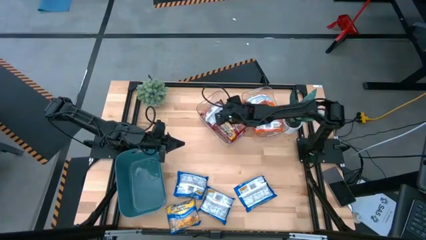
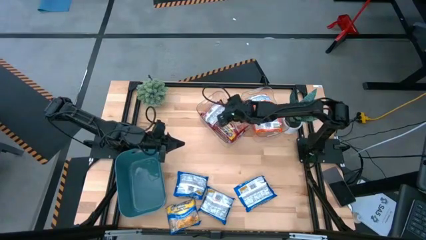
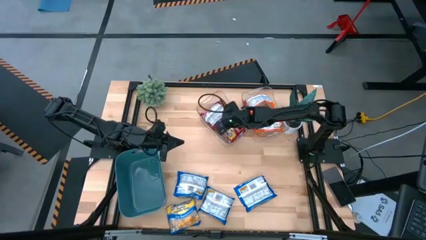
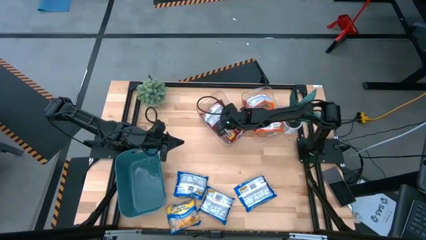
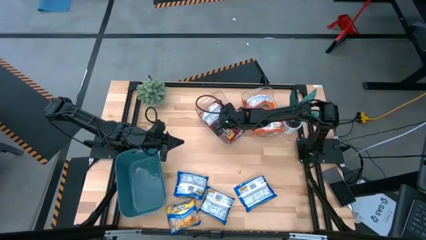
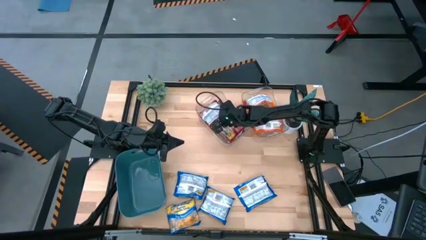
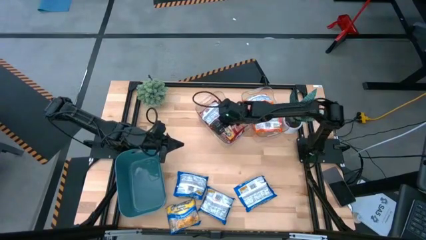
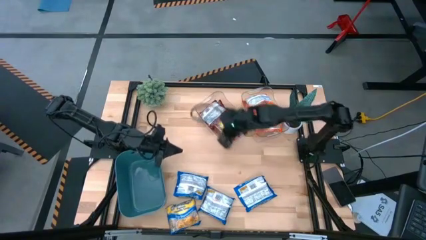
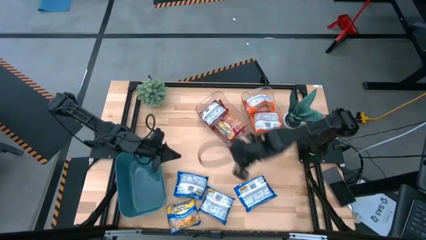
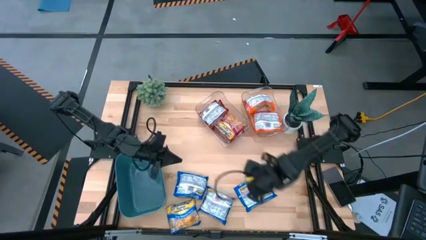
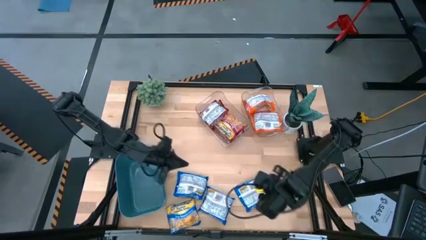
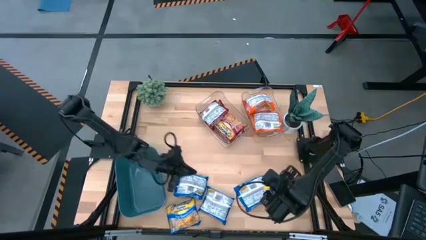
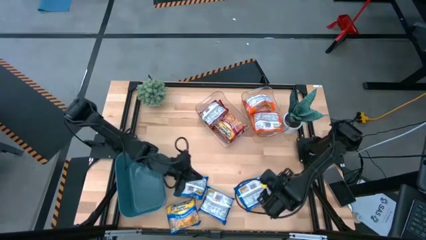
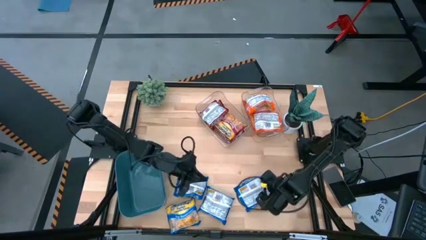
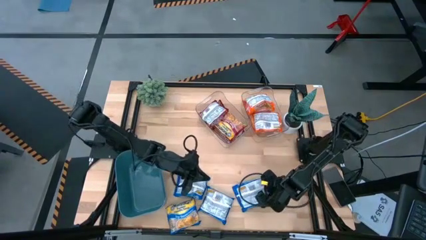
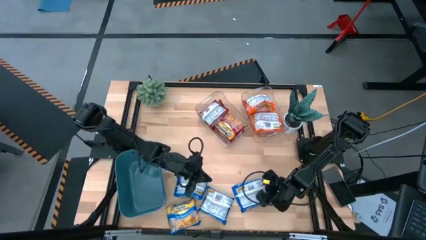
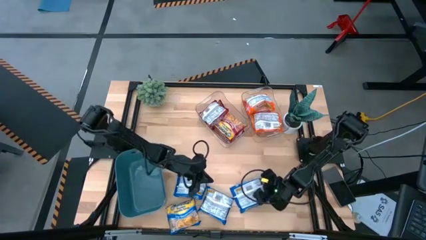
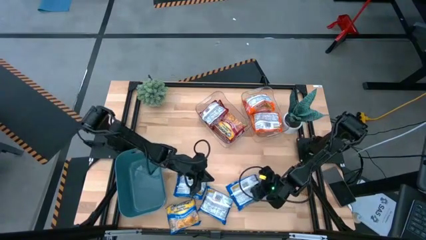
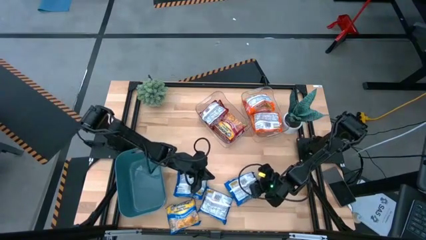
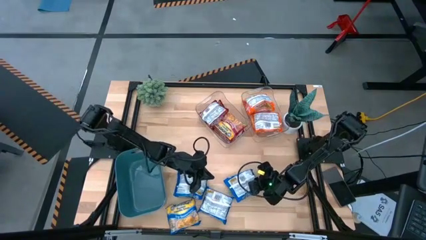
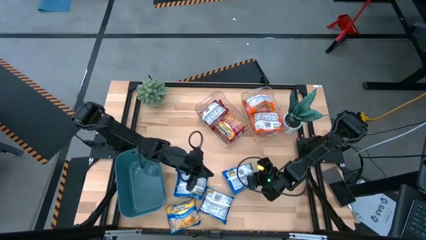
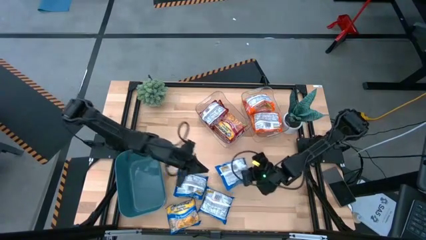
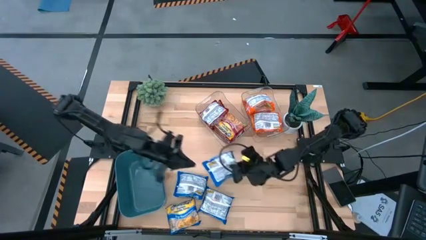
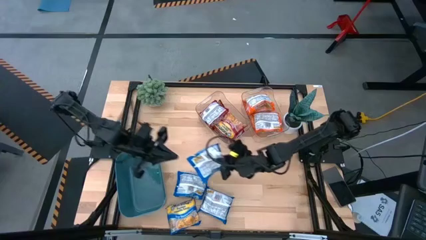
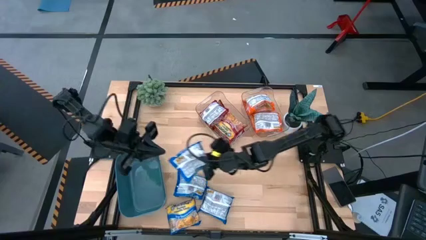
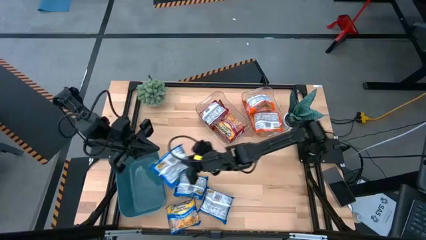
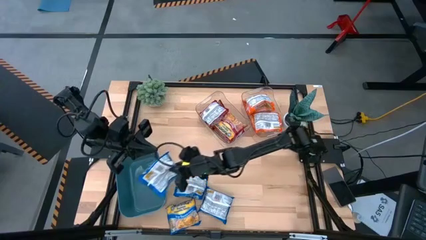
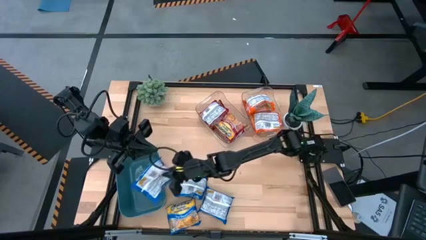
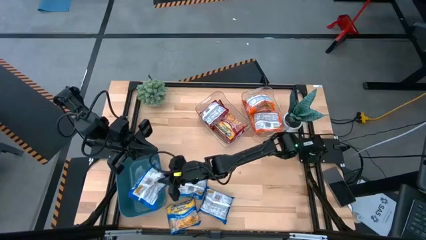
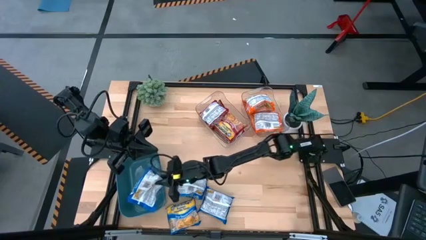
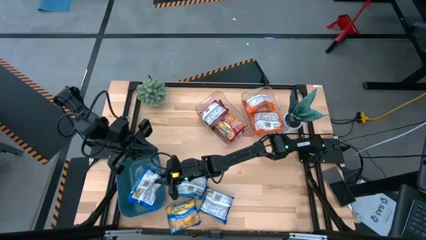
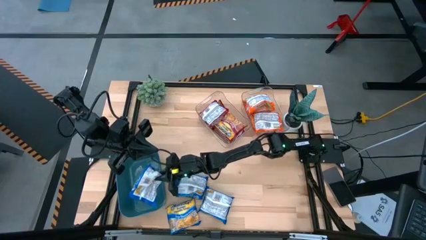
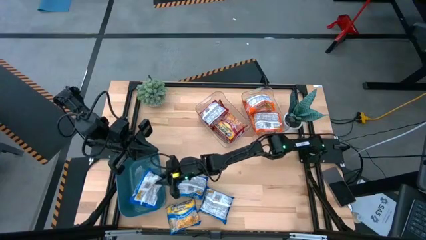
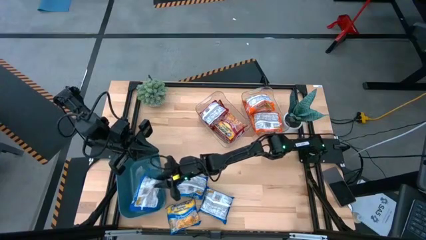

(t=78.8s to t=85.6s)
Task: Sort Maruchan noodles
Put the blue noodle pack into the blue bin

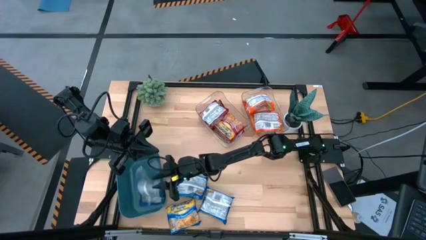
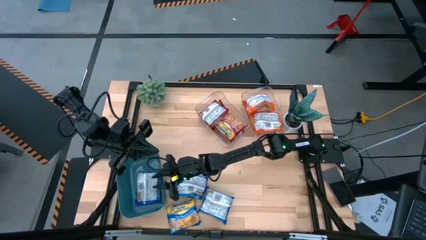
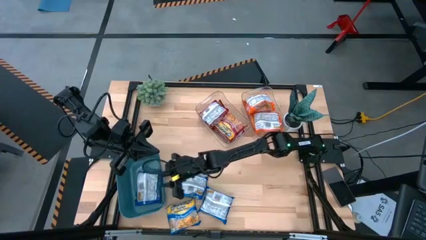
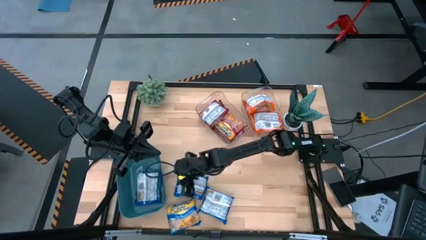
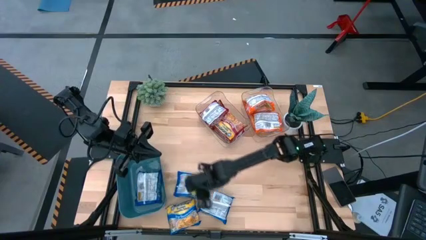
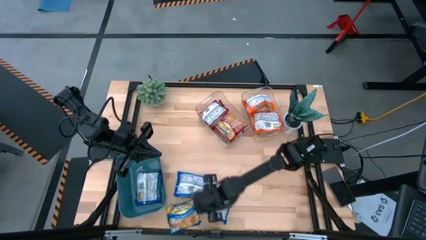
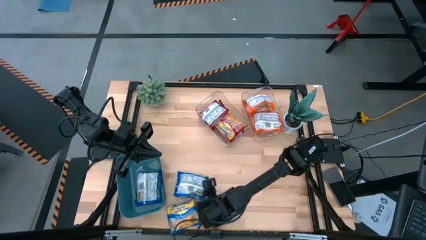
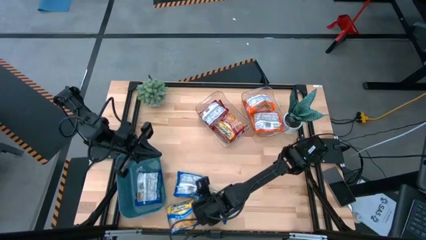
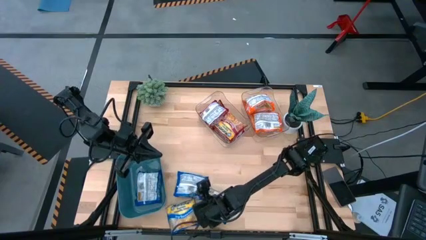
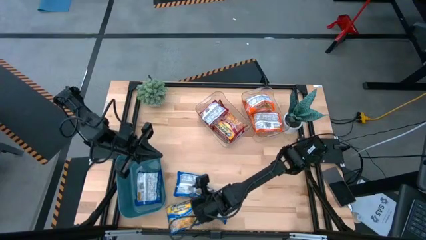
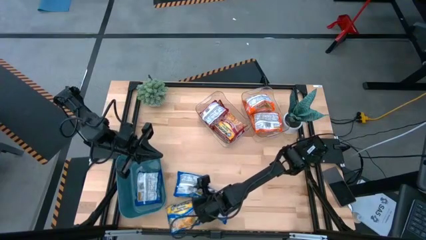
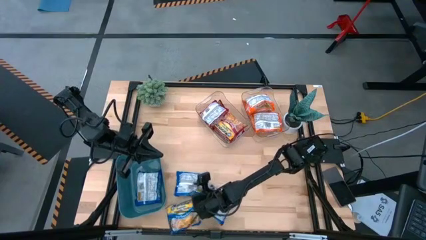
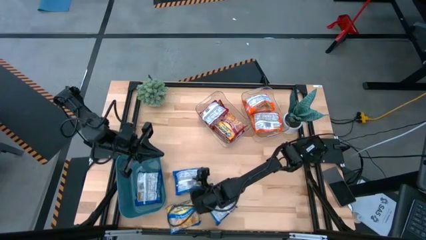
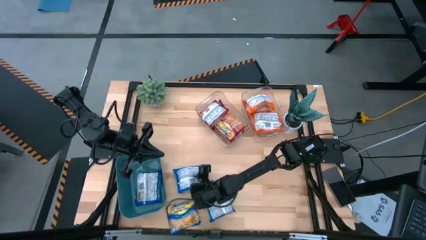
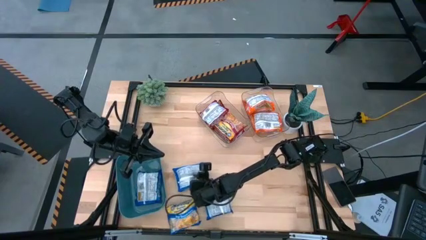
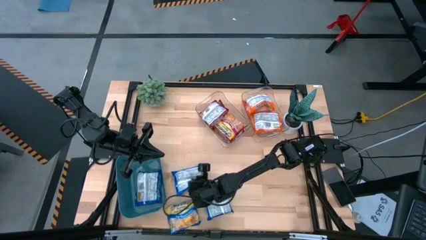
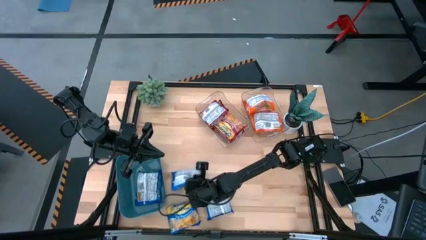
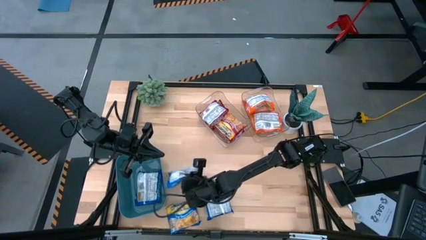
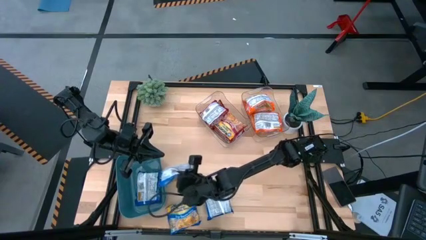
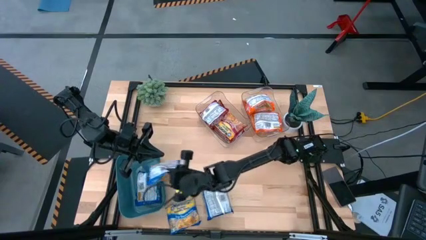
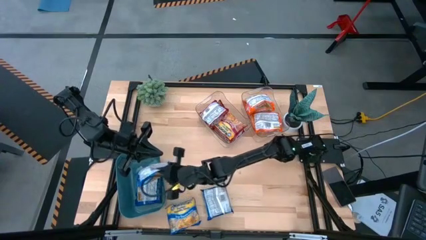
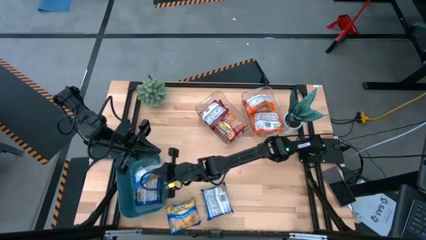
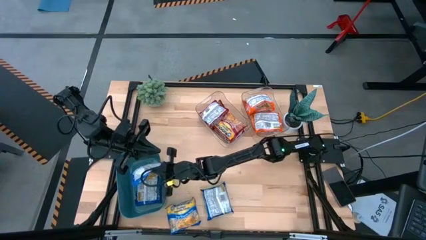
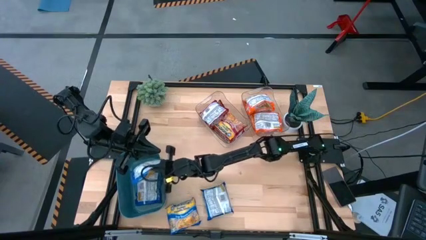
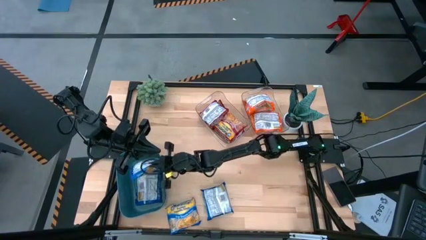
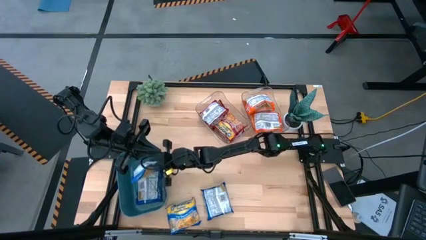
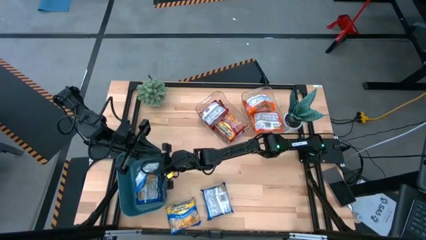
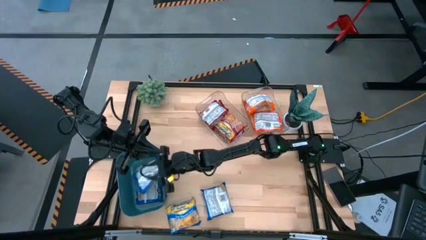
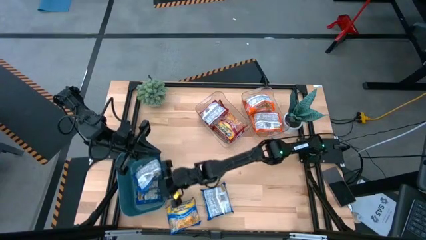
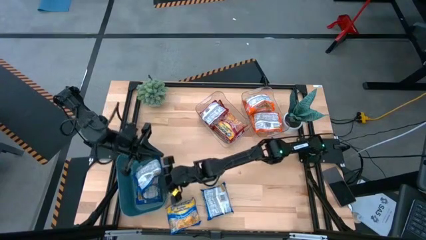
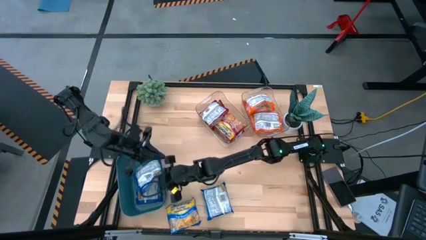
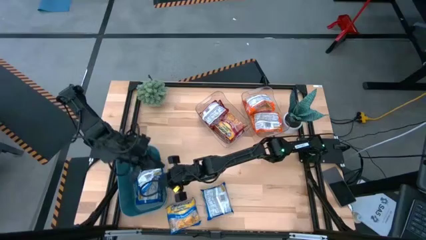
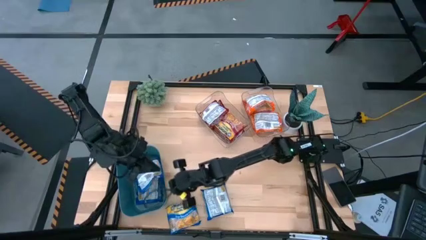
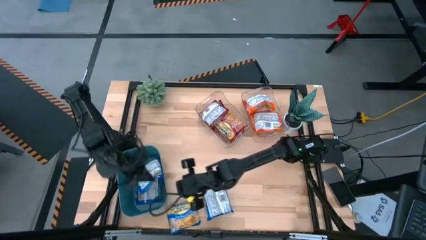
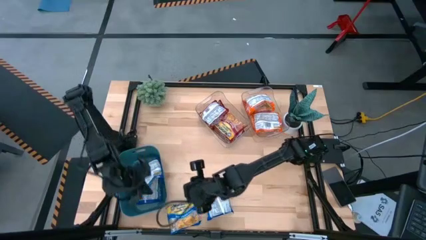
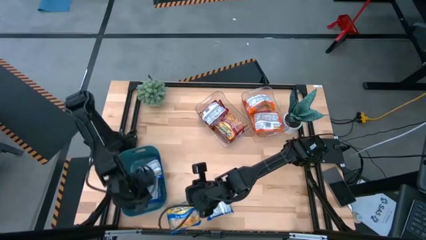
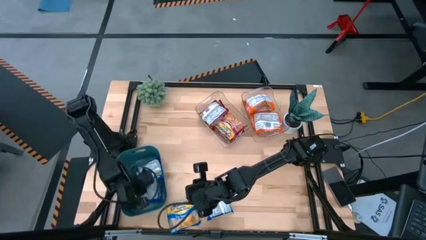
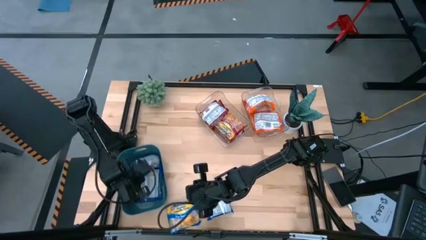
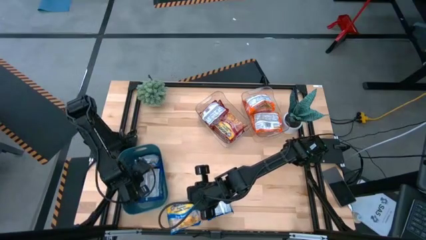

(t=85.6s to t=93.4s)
Put the blue noodle pack into the blue bin

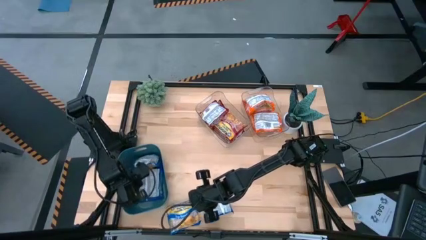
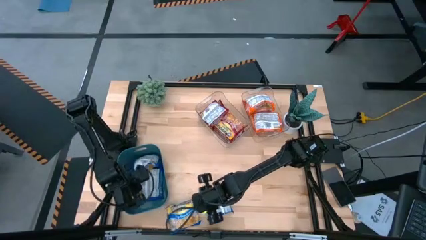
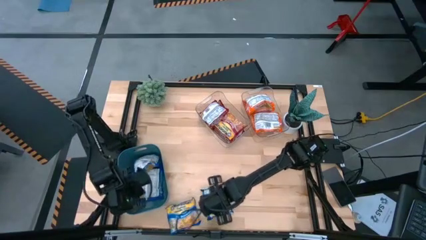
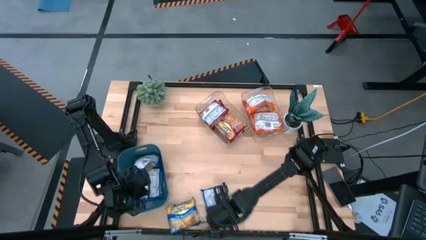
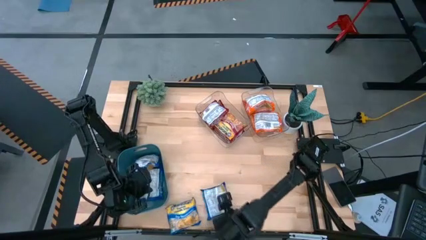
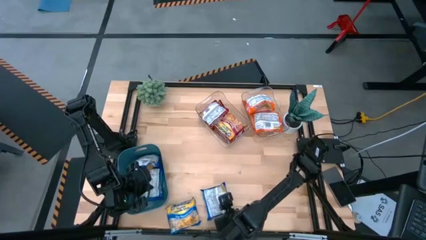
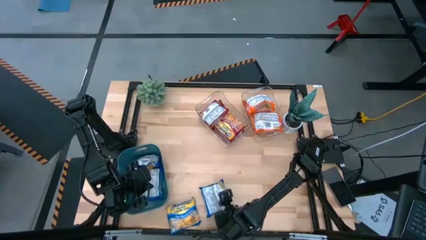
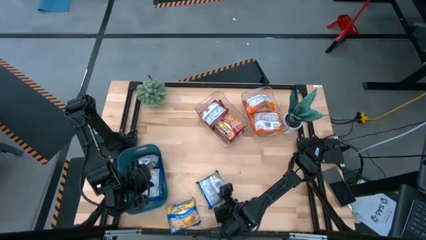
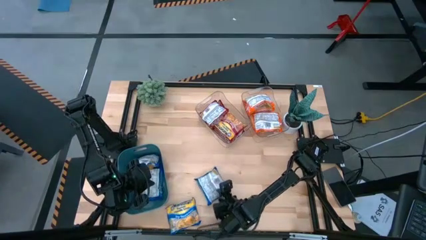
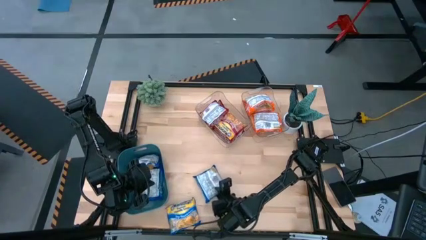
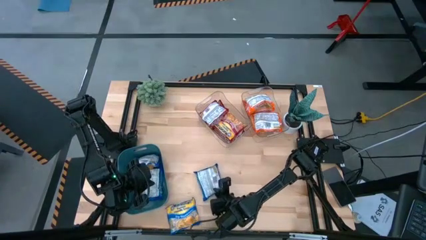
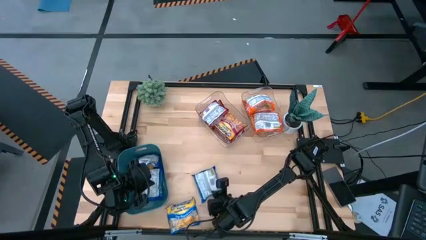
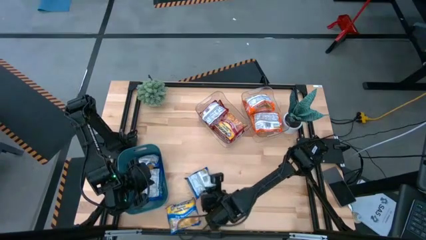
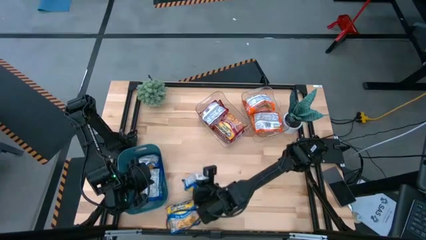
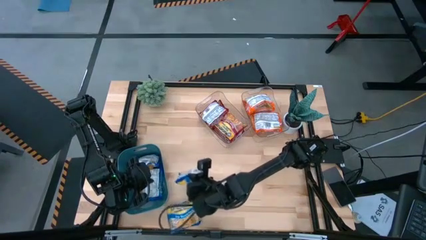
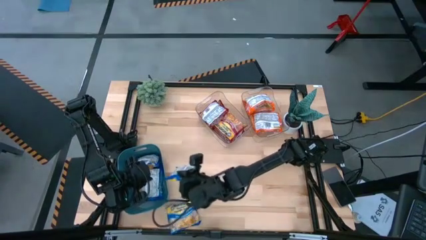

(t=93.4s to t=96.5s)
Put the blue noodle pack into the blue bin
